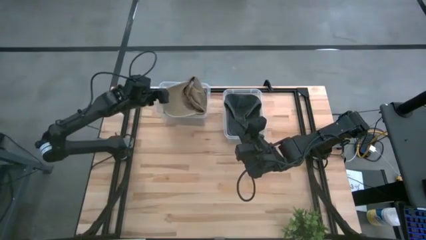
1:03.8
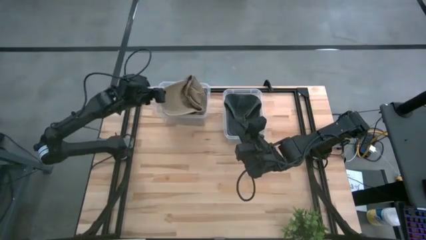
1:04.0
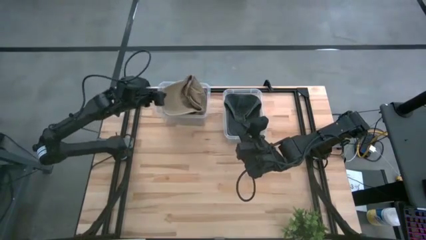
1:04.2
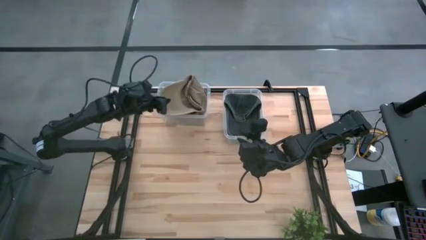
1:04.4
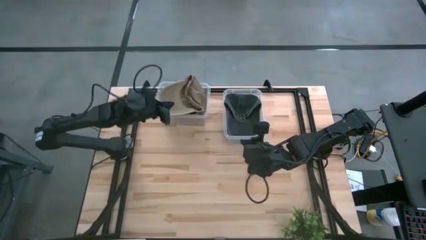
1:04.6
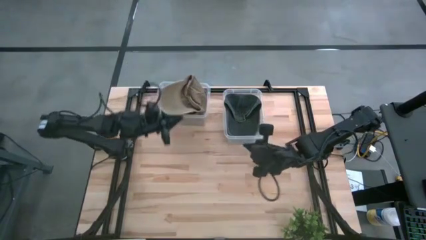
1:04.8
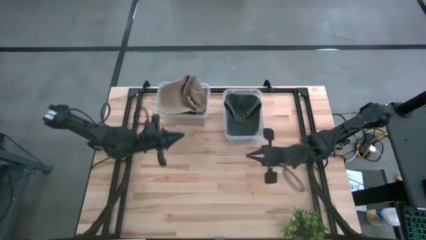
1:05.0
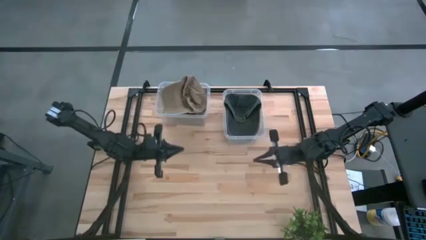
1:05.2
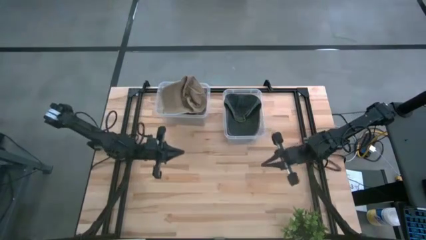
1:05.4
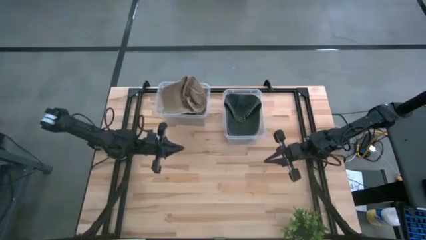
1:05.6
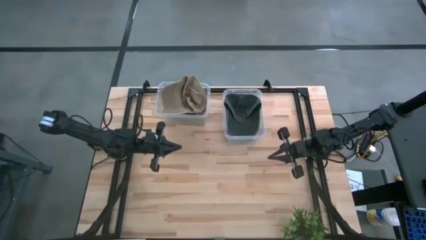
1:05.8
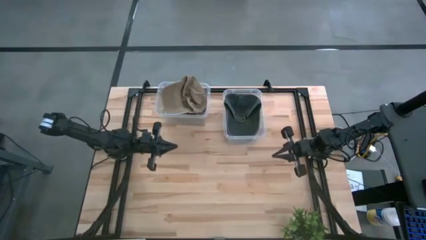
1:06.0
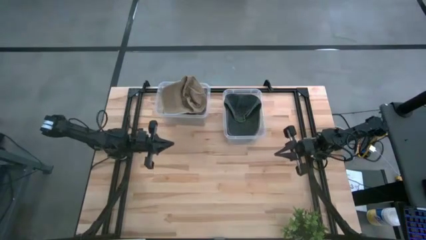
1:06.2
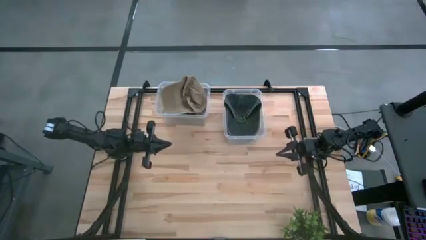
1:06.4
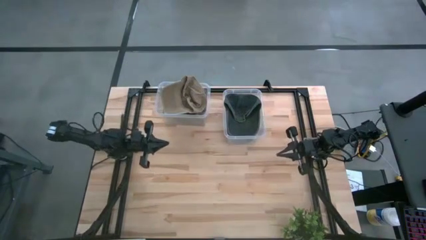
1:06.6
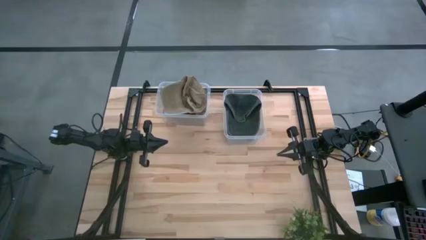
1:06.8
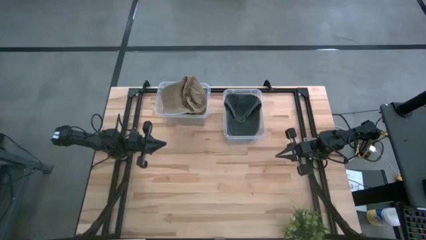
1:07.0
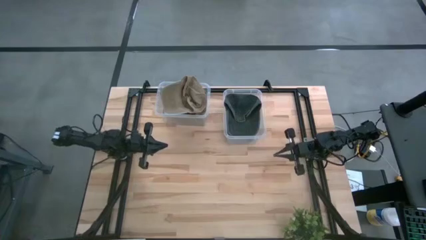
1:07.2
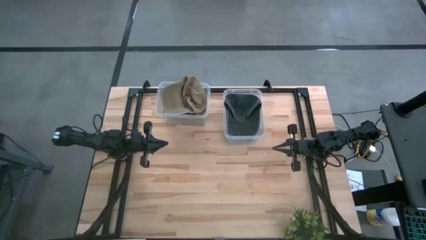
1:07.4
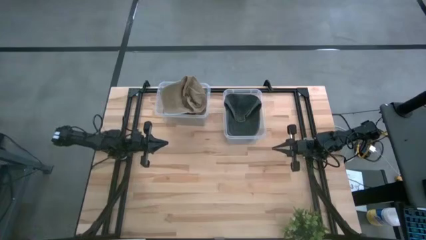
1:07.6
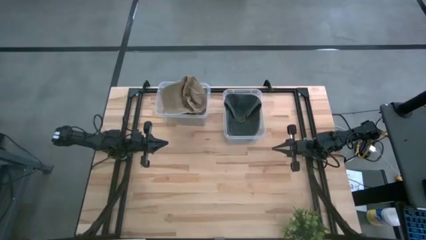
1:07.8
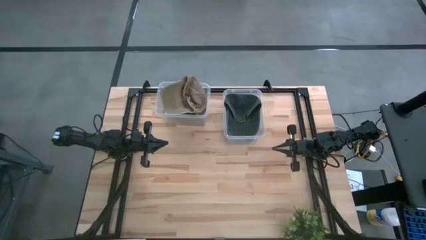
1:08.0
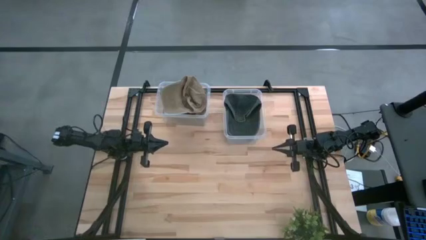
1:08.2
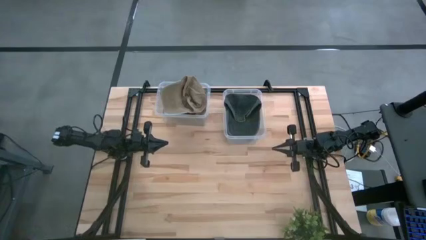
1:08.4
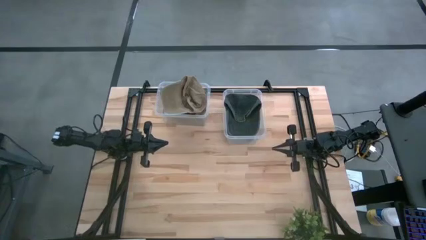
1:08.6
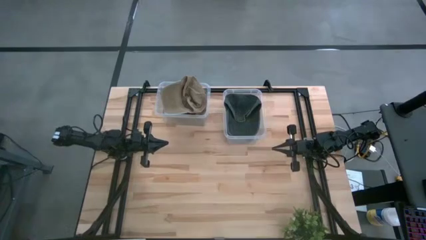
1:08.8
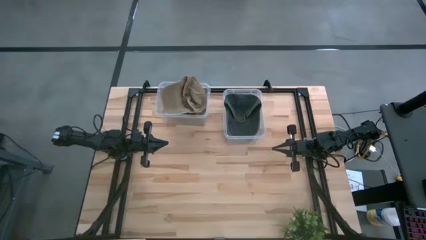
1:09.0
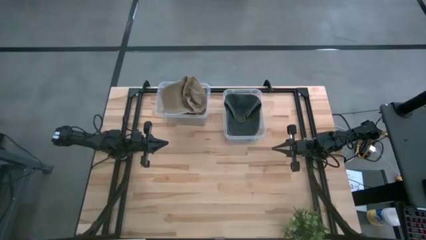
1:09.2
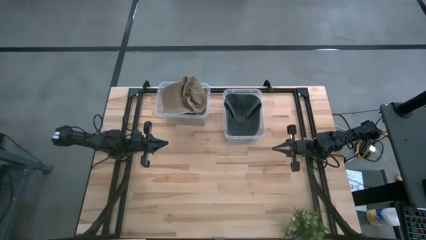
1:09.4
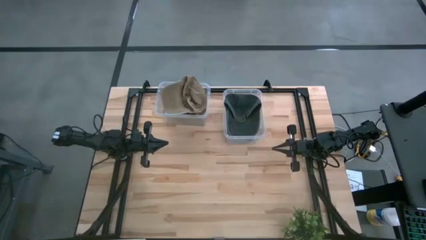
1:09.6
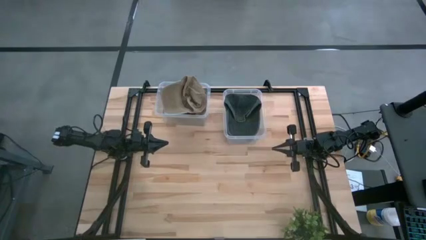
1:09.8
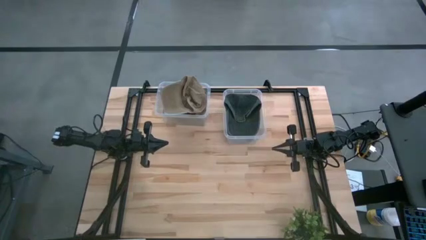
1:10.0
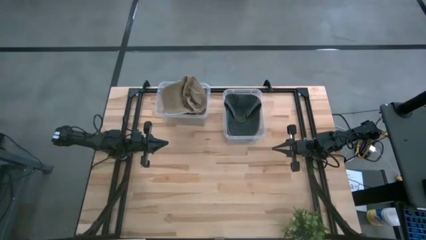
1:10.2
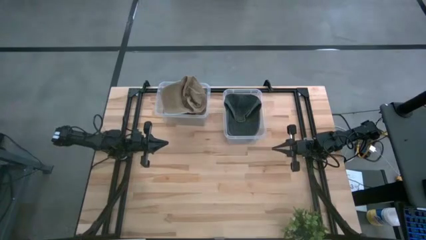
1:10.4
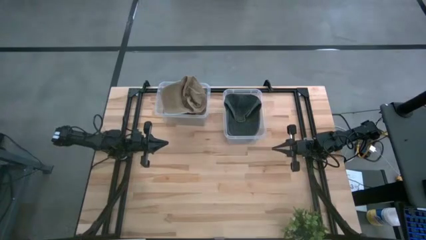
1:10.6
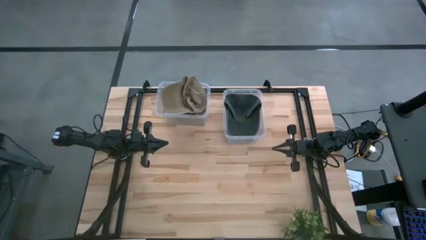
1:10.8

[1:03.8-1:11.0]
Task: Pick & Place hat
Return to Home Position

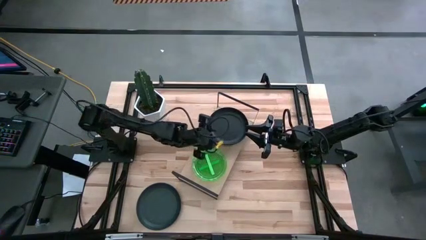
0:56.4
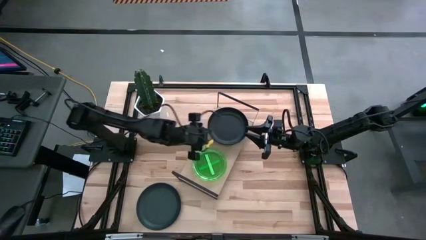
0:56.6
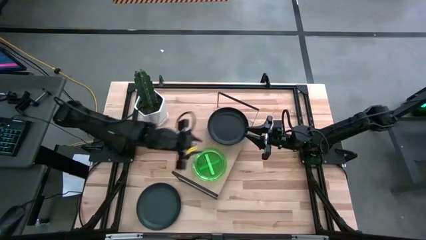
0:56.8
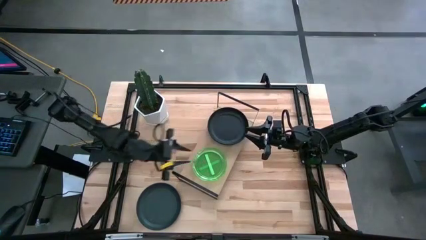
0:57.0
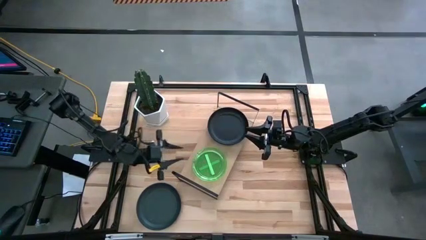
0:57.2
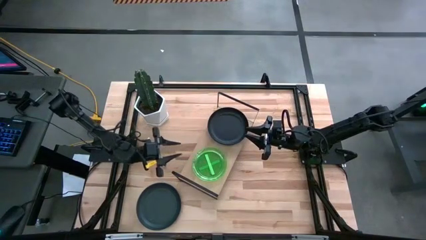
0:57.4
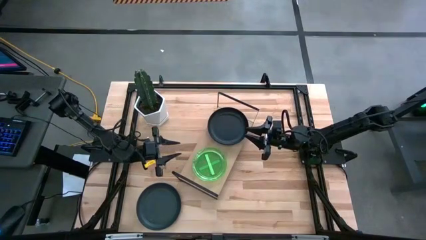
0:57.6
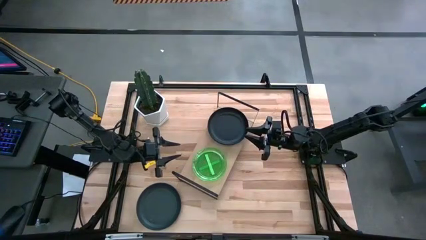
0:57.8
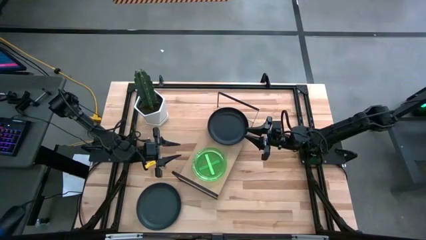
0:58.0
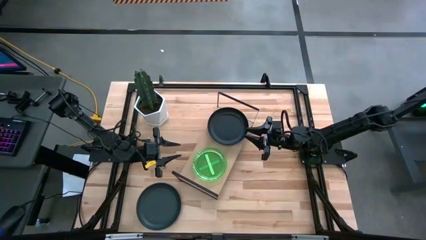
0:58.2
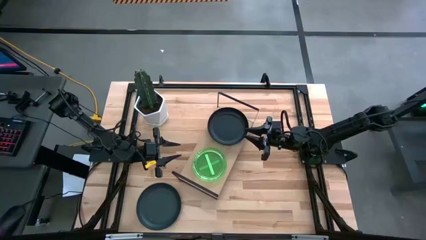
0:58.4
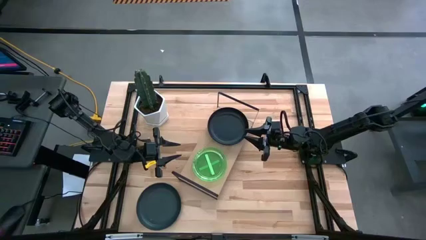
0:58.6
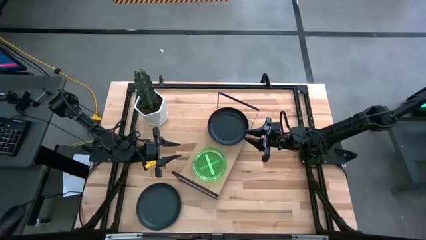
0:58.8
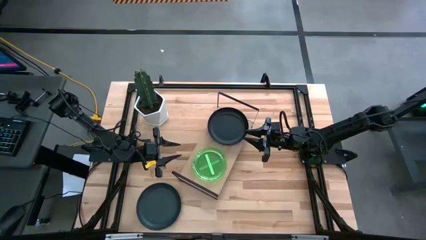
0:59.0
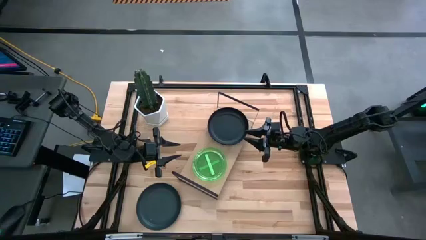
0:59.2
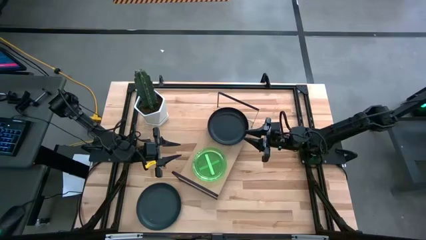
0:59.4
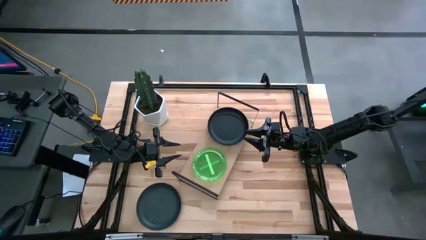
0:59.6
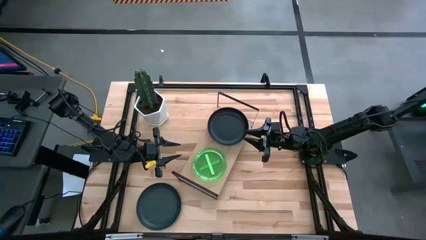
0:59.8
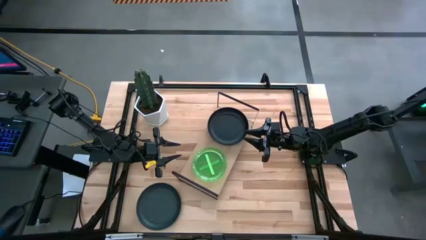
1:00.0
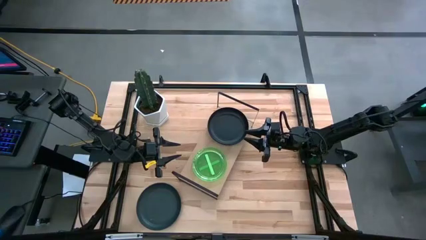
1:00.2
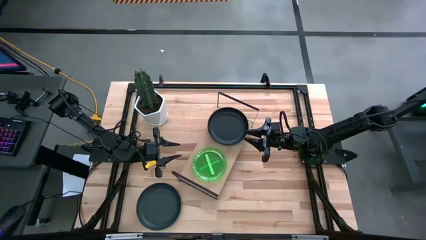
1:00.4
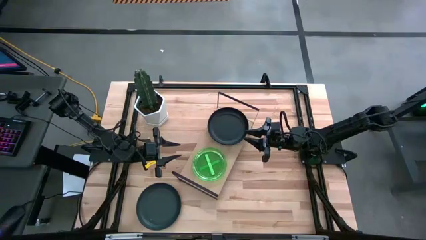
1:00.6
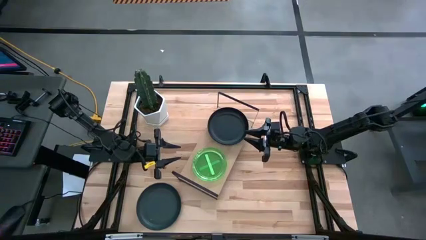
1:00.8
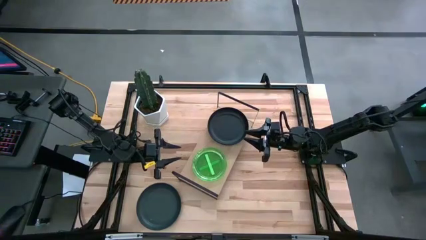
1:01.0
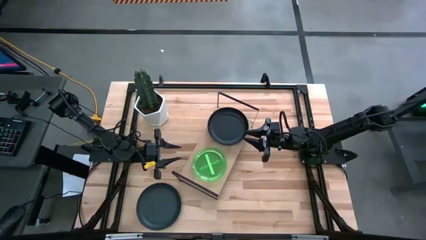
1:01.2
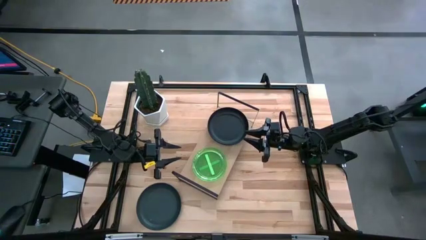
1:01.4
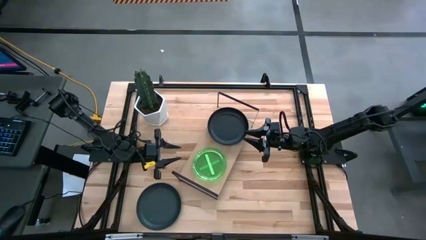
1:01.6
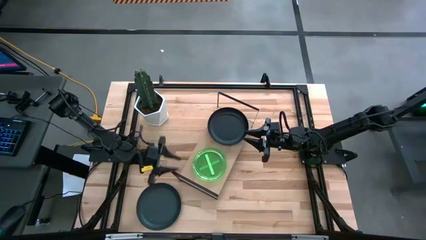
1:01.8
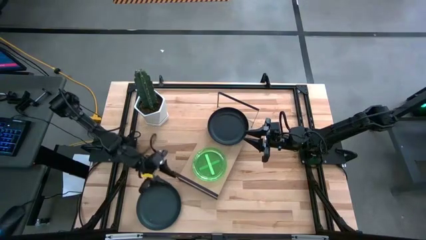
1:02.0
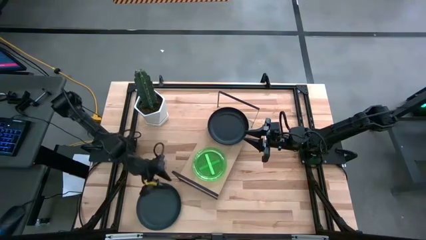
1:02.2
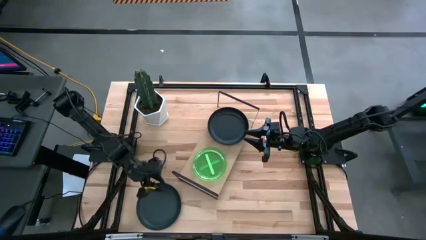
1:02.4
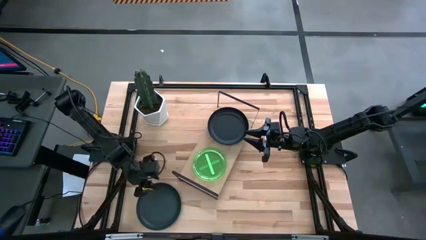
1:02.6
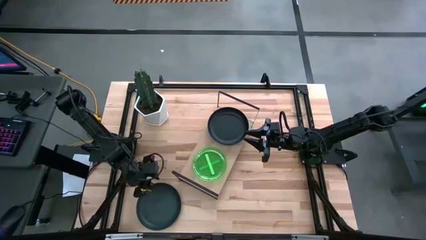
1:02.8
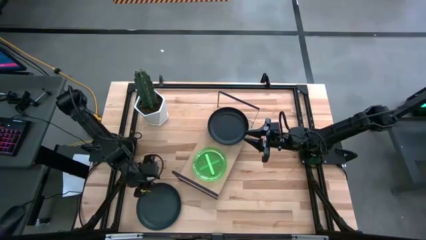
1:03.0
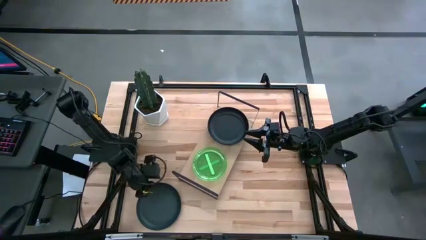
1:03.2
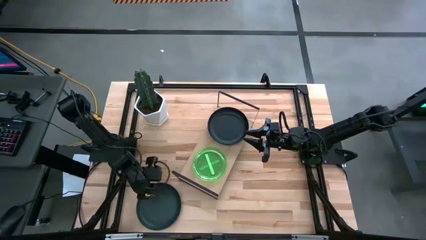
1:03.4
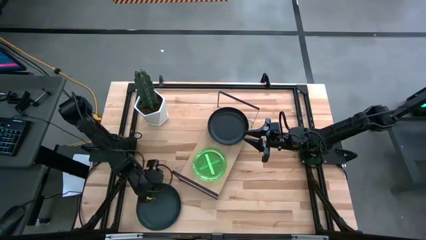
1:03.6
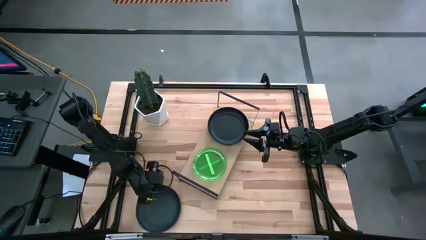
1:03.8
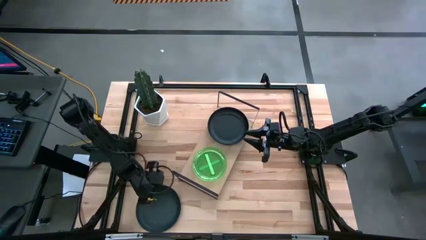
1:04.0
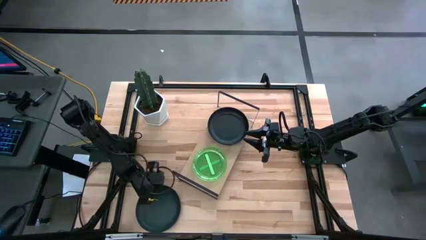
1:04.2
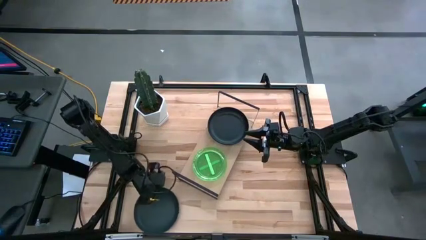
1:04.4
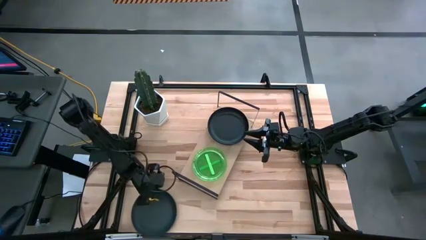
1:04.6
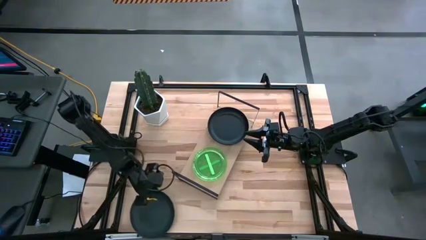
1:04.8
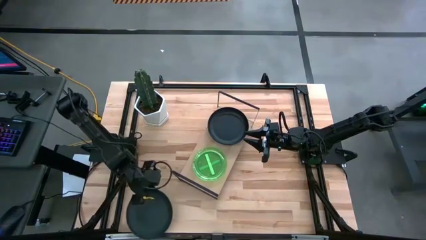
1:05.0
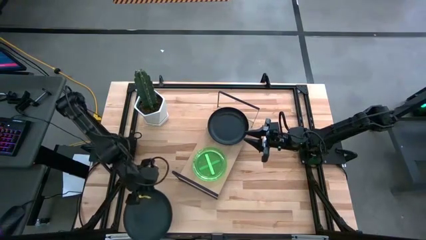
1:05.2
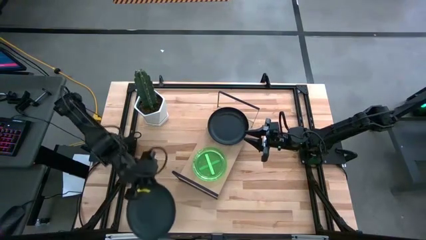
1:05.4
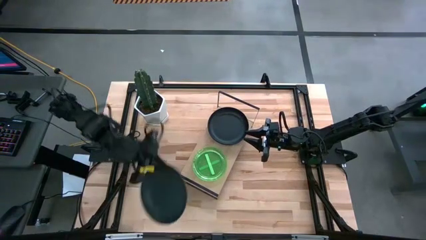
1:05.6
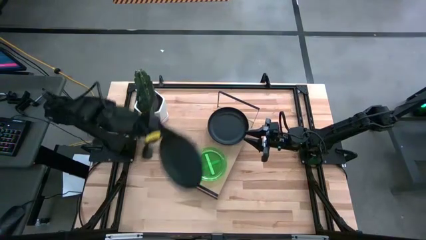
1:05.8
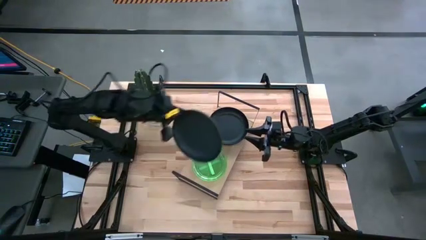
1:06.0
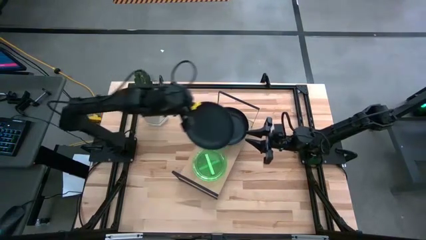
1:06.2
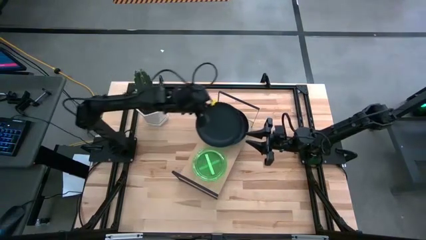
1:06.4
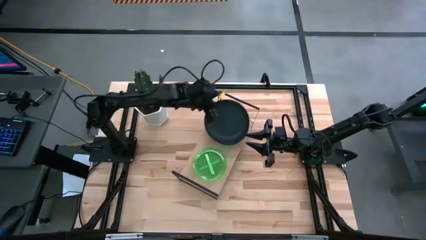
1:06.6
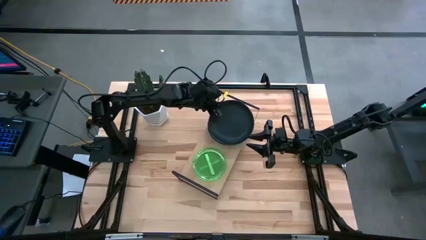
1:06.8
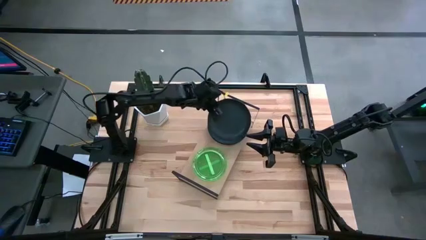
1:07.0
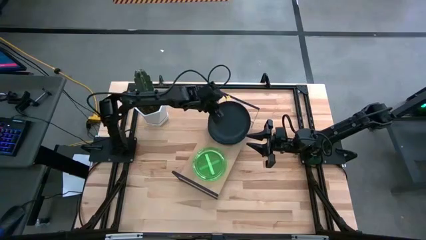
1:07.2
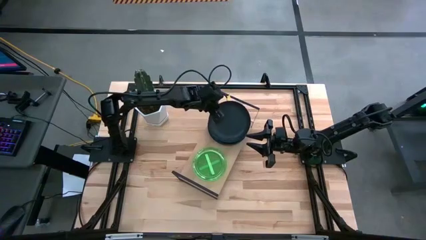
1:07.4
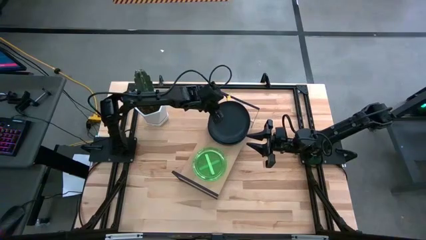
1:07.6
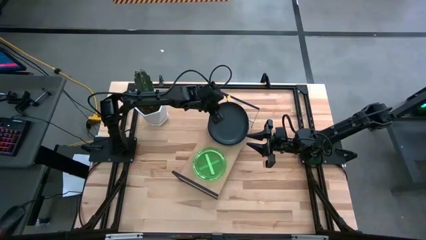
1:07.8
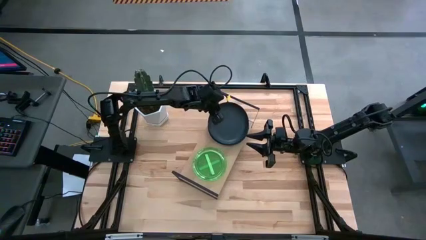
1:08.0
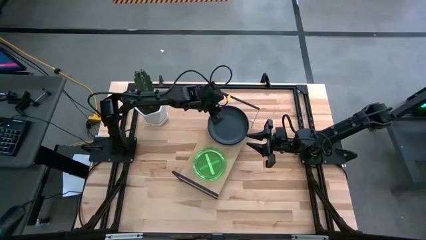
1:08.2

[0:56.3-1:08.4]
Task: Place and stack plates onto a shelf
Stack the black plate on top of the black plate on the shelf
